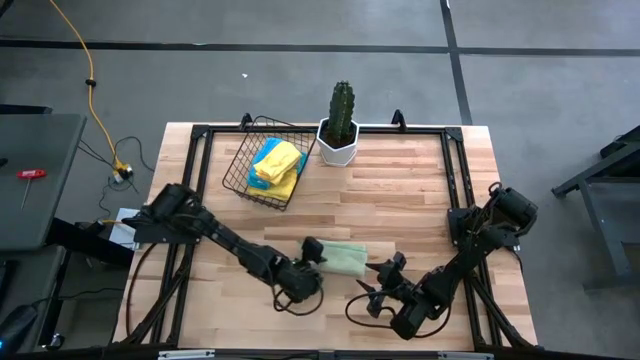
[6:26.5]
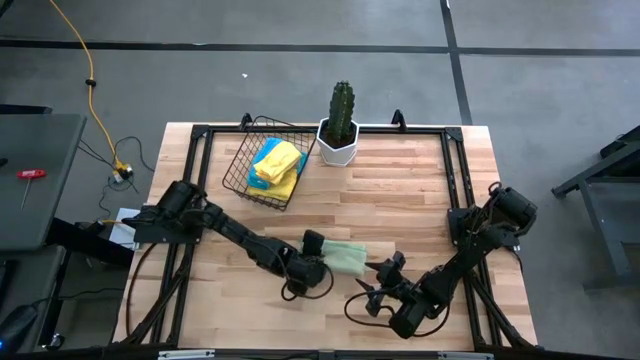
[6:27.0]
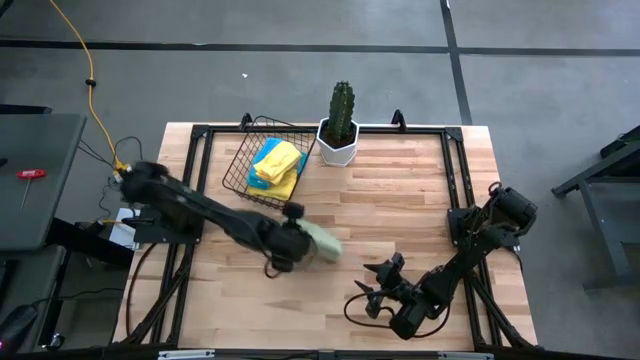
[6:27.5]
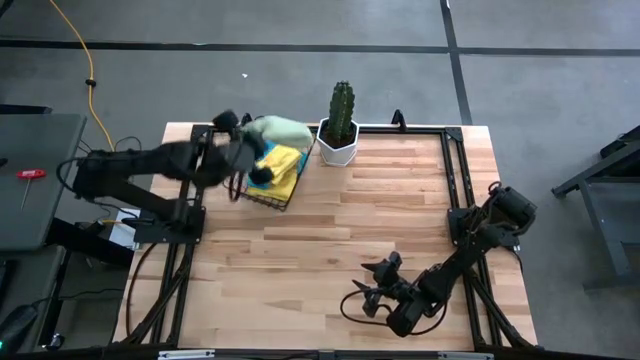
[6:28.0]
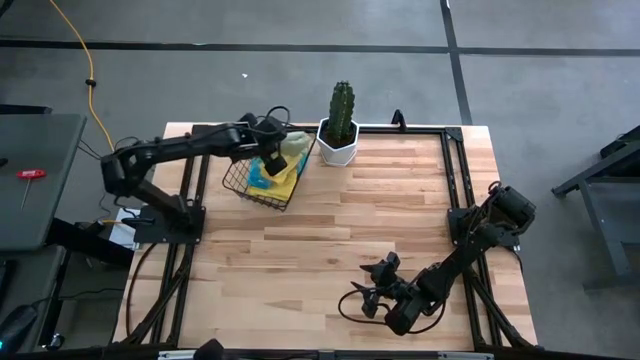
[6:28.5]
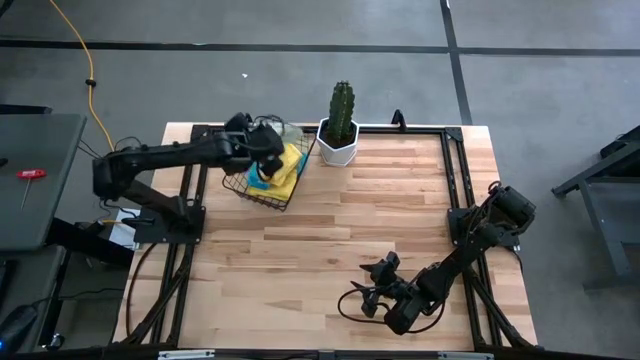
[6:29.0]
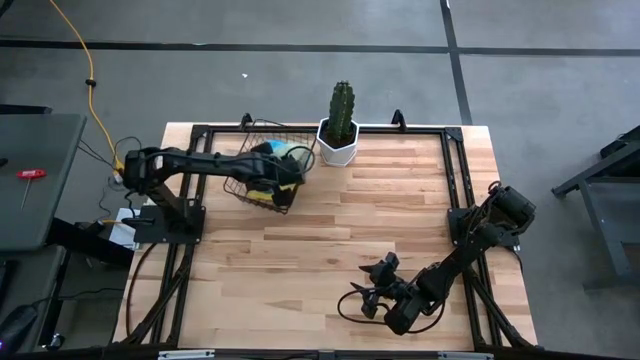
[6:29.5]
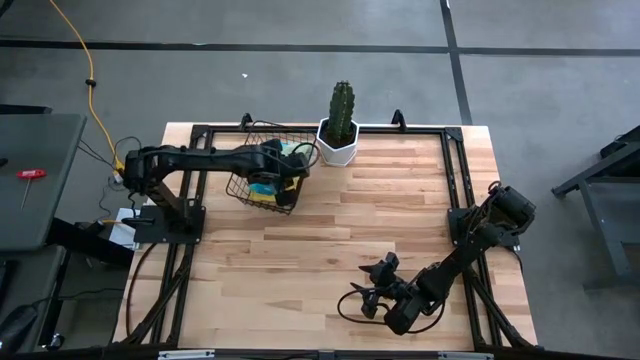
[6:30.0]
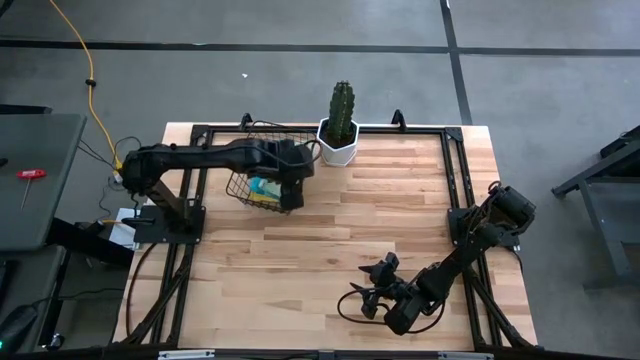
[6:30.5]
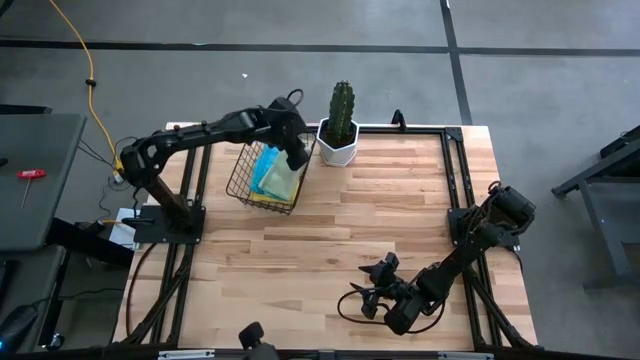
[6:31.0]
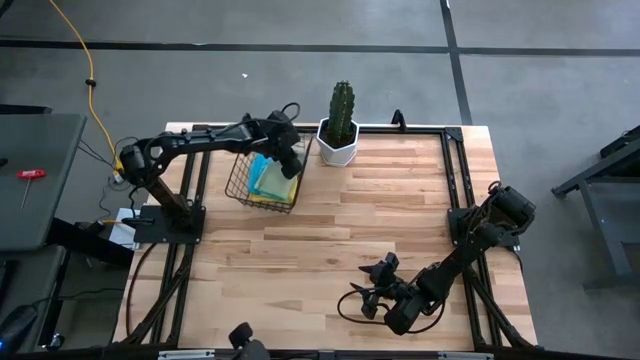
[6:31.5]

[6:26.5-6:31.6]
Task: Fold microfiber towels
Put the folded green microfiber towel into the mesh basket

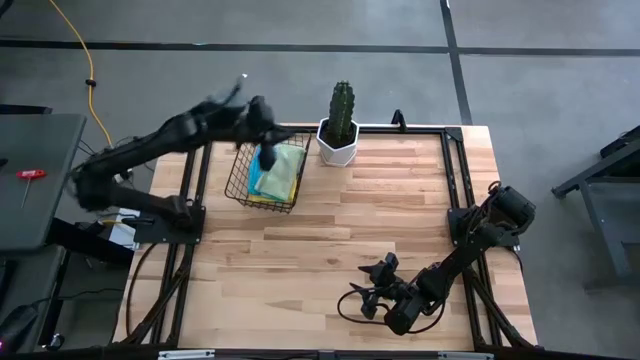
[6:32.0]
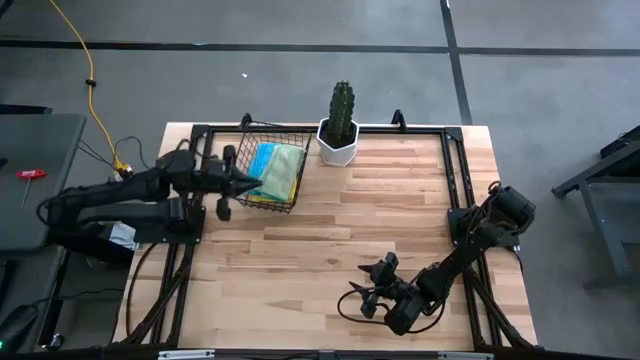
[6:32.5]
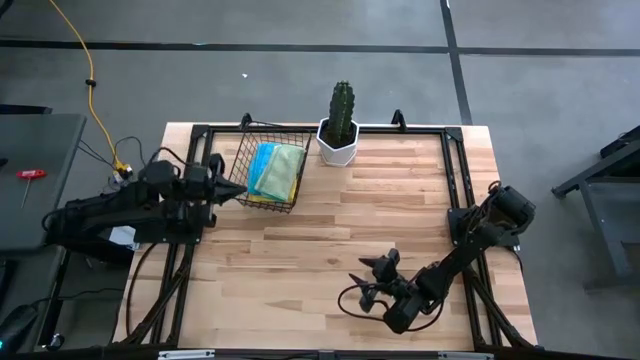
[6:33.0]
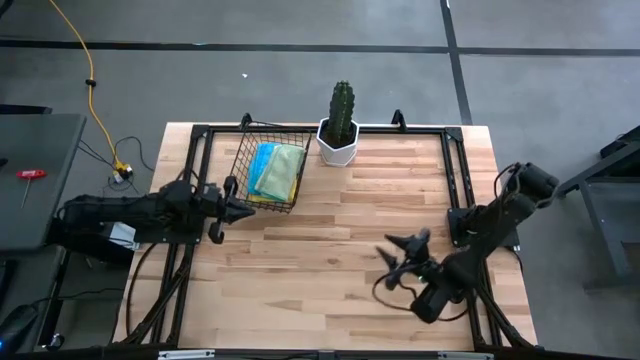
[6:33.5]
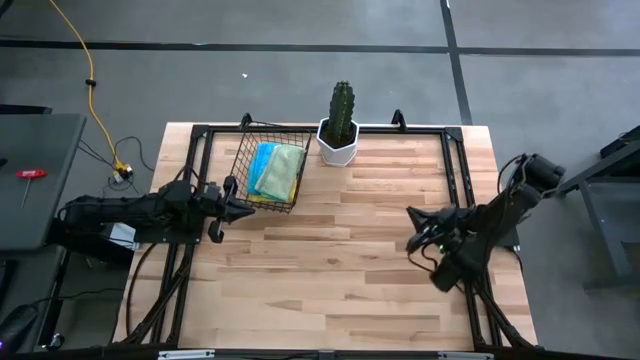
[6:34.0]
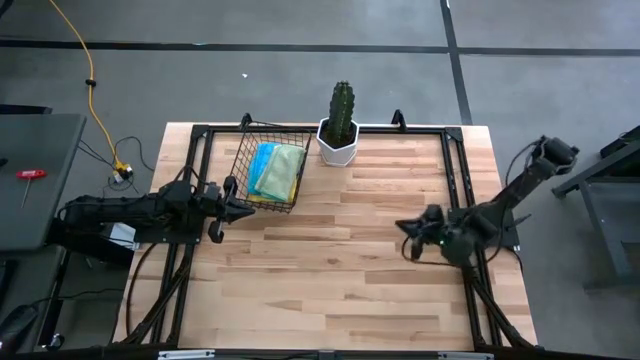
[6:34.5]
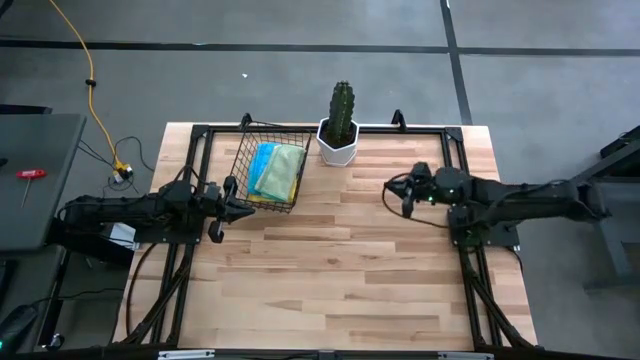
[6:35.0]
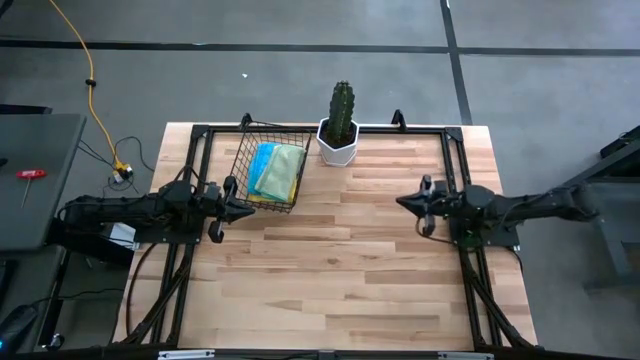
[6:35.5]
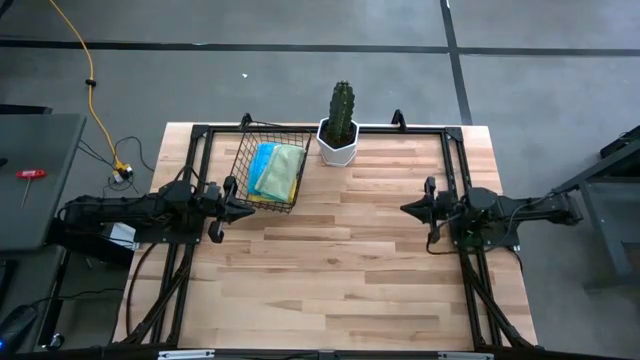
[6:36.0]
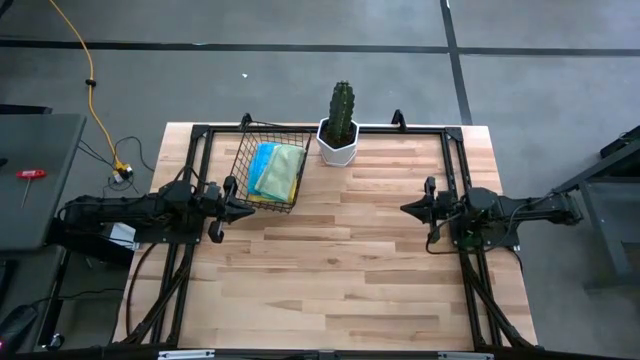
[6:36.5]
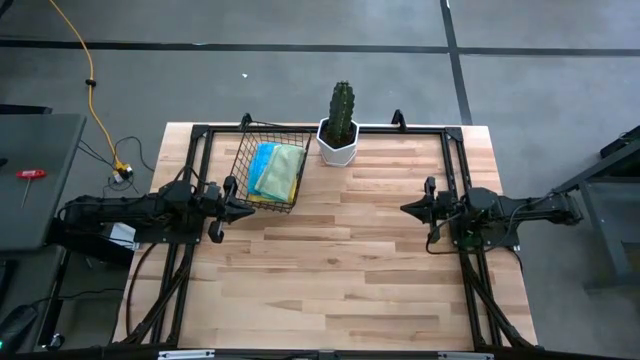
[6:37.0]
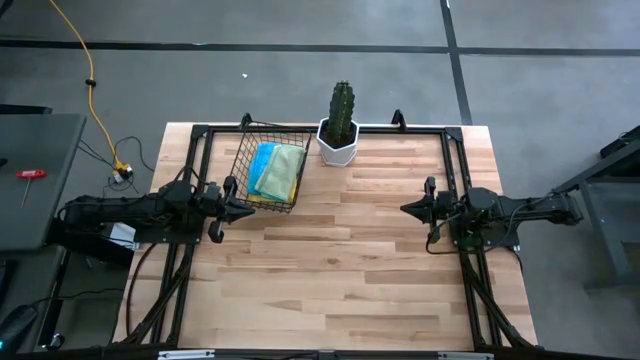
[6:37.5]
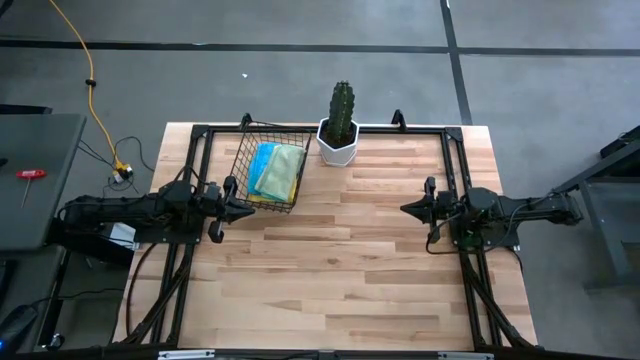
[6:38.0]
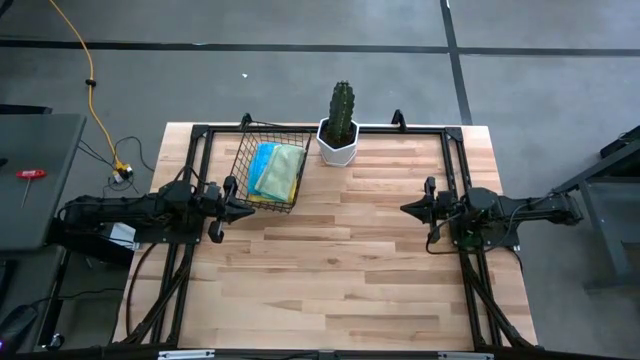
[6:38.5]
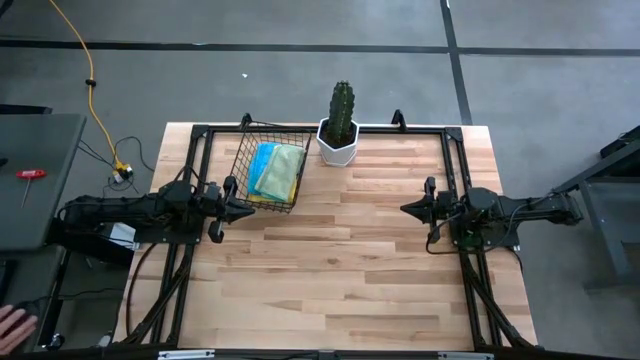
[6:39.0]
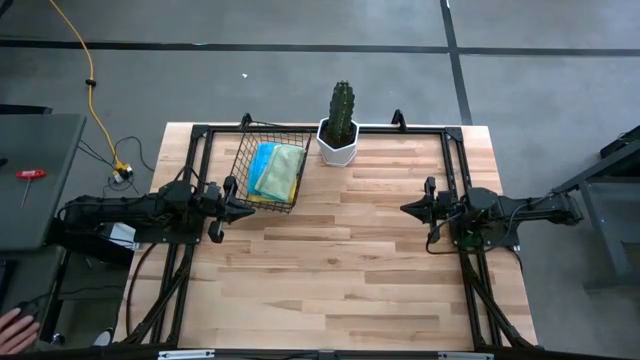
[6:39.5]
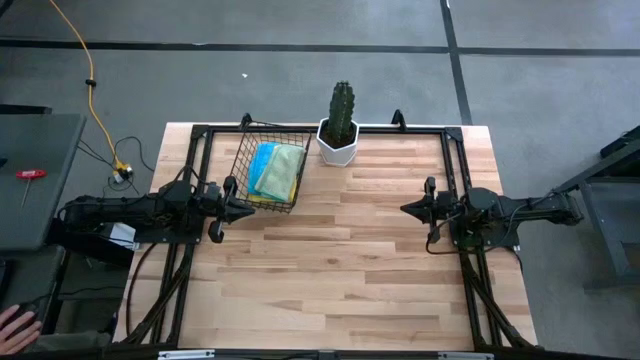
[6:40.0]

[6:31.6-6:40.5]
Return to Home Position

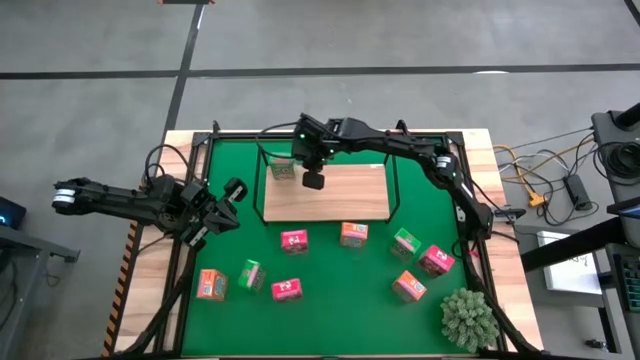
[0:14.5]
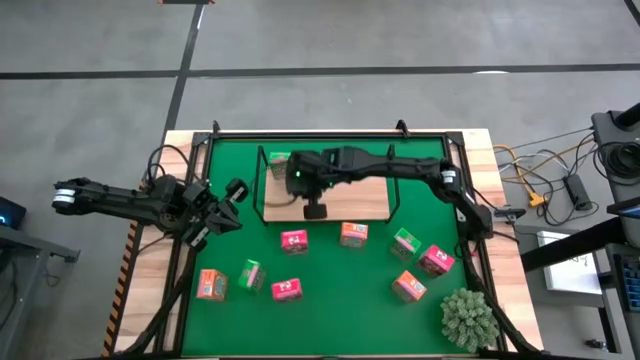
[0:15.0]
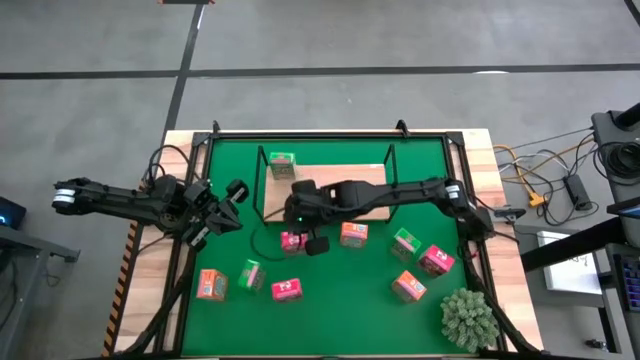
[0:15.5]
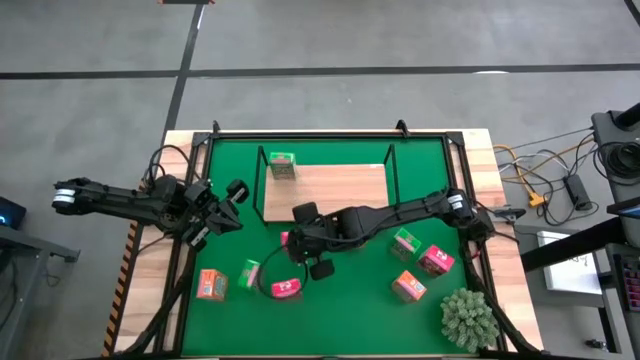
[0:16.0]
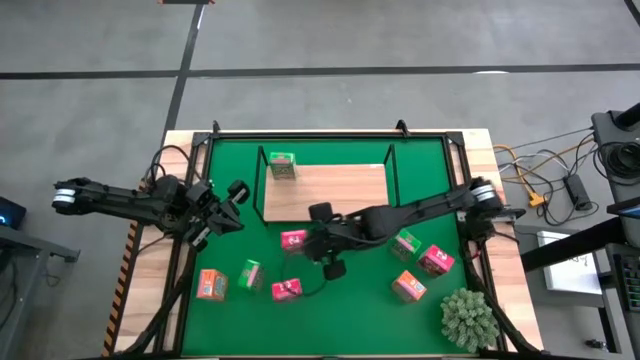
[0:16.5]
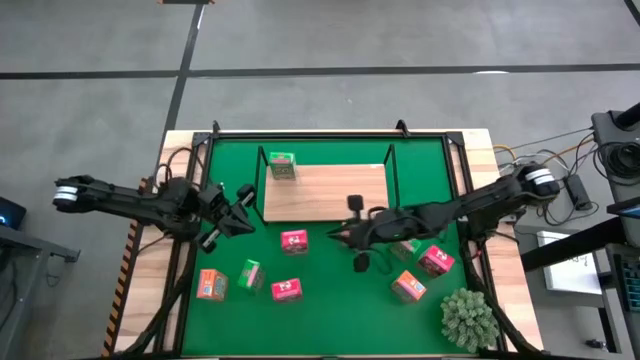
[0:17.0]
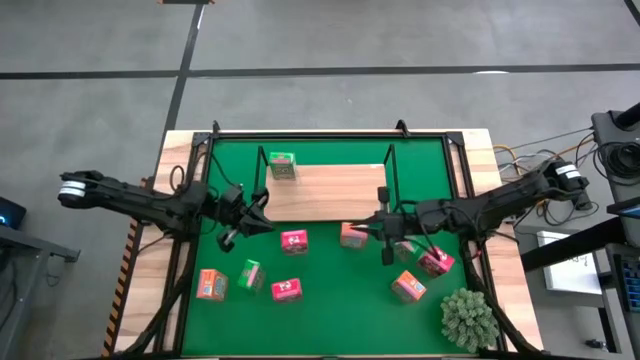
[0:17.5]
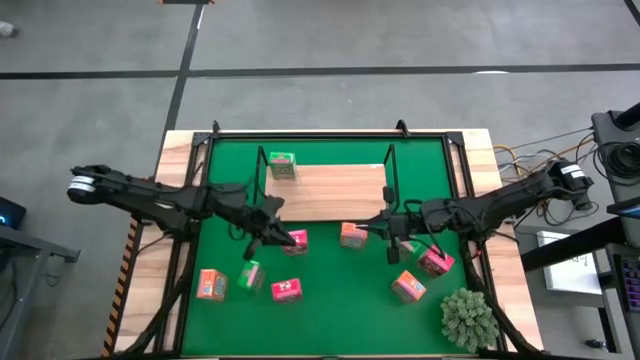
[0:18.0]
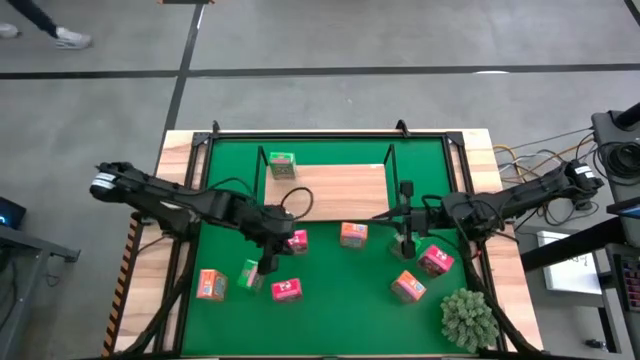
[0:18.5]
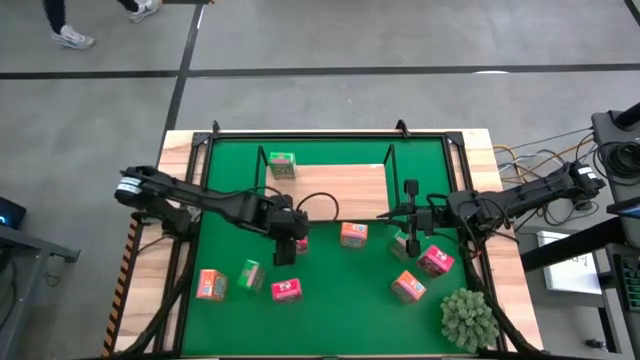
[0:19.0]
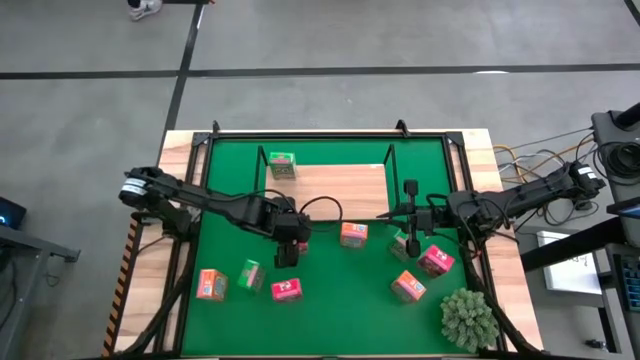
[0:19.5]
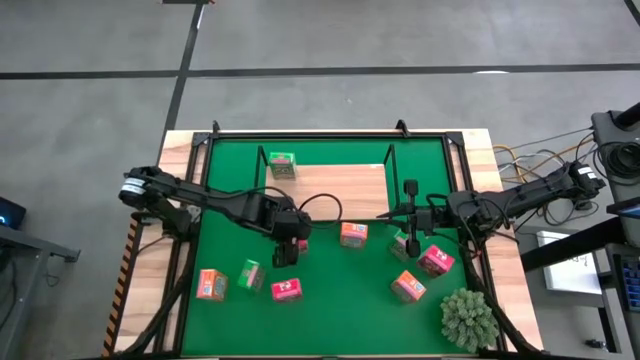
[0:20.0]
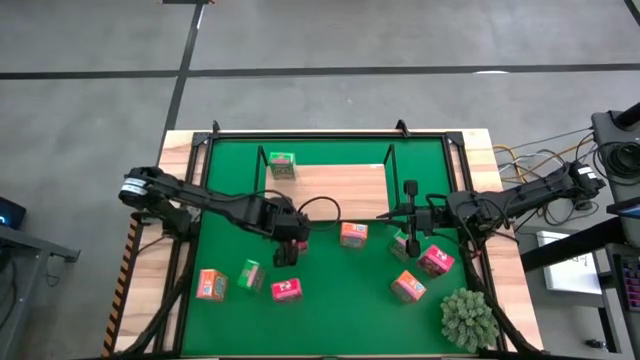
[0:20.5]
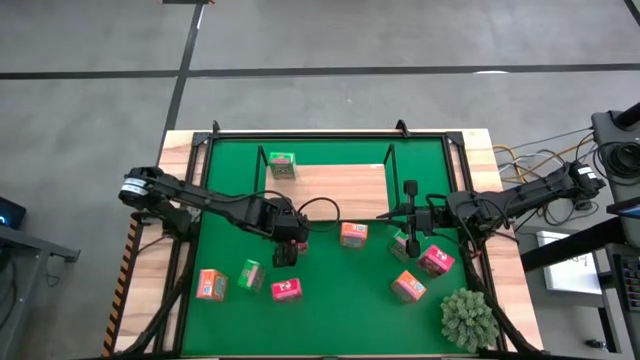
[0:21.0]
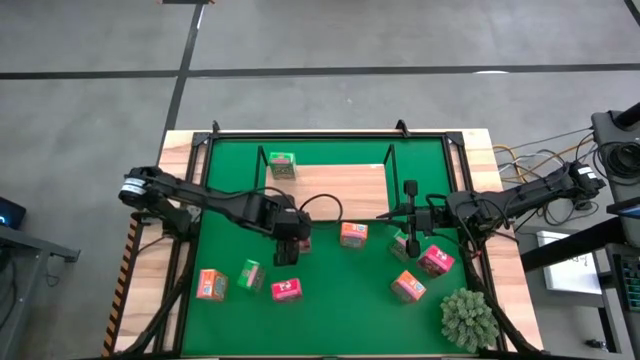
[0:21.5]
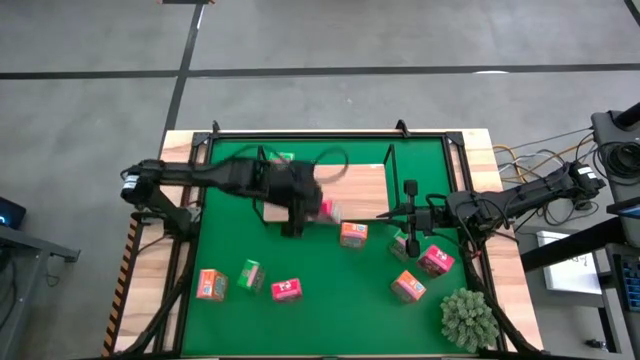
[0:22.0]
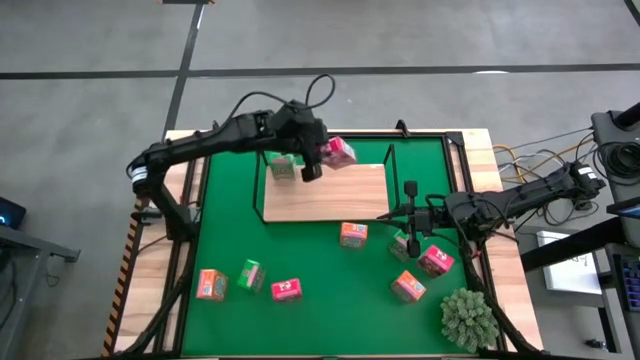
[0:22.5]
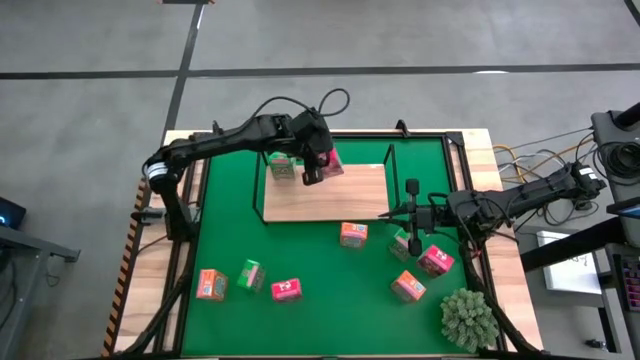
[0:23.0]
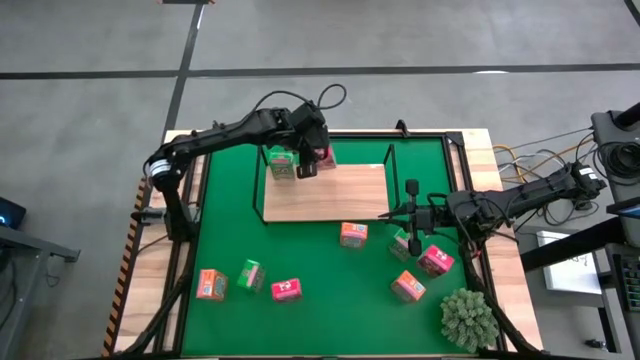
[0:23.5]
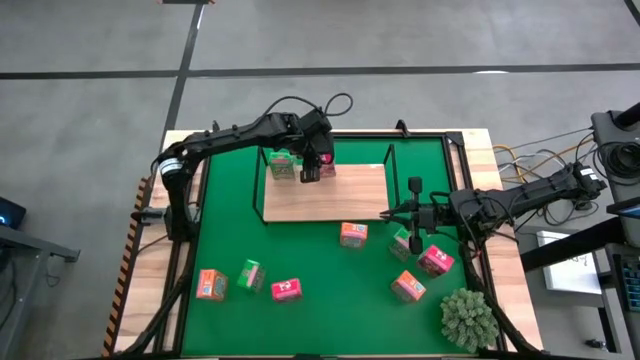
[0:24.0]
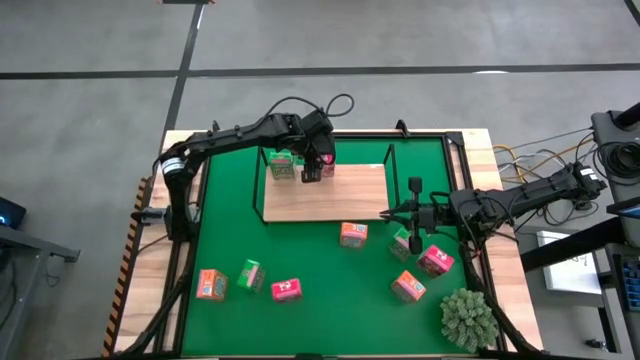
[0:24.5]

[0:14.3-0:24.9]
Task: Stack cereal on shelf
Put the top left red cereal box on the shelf
